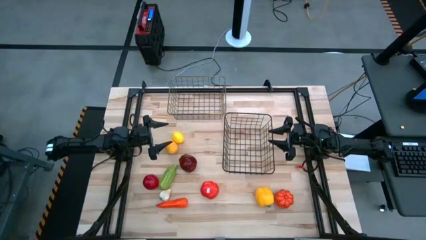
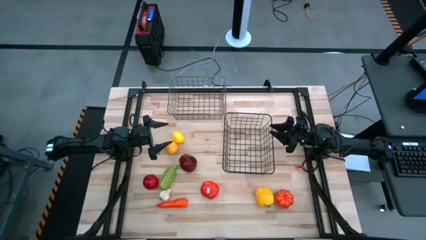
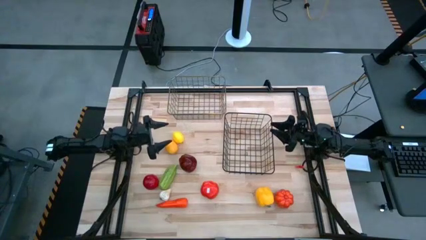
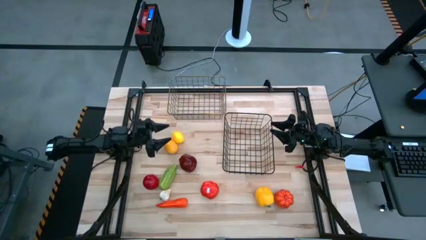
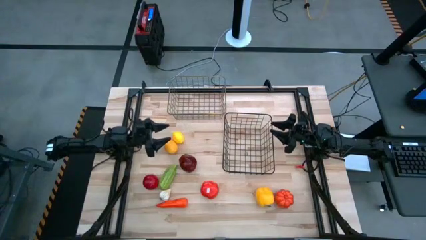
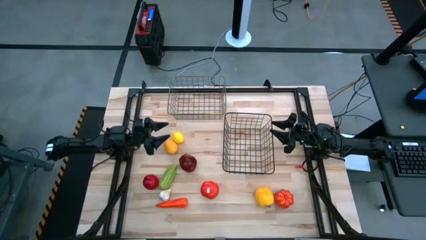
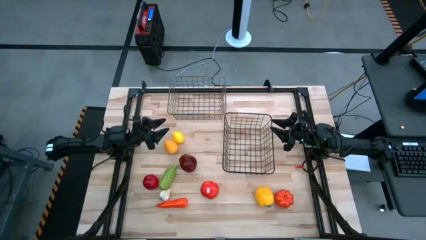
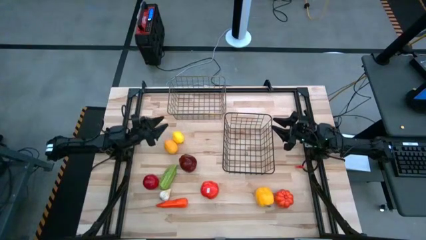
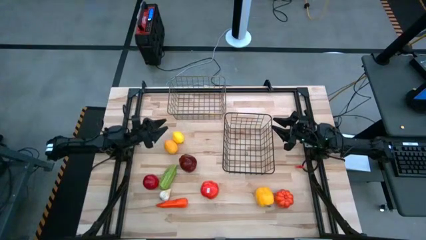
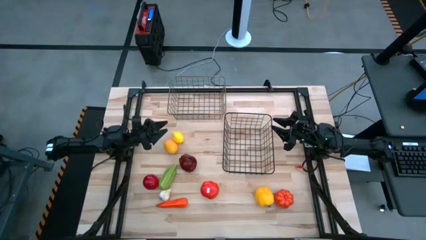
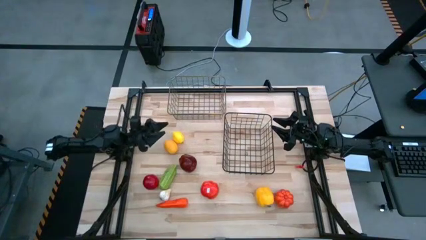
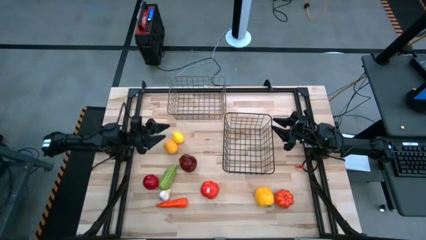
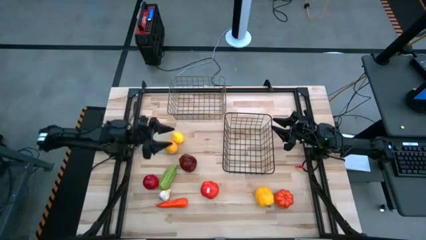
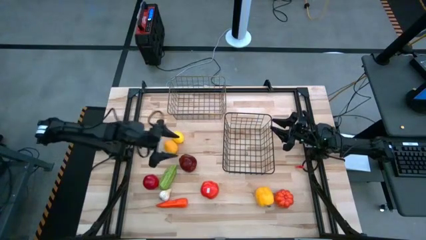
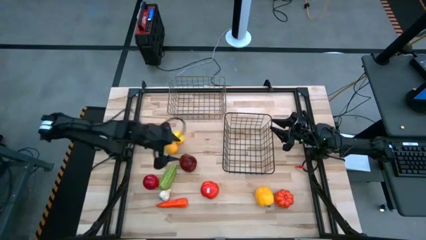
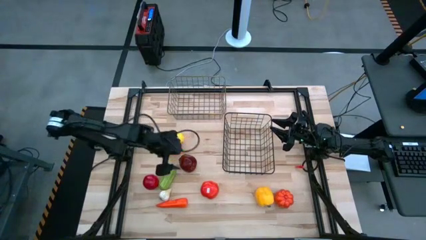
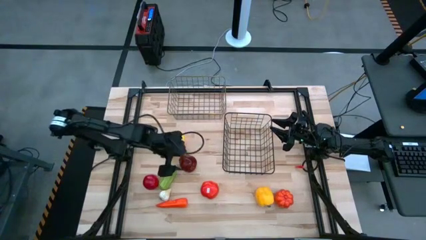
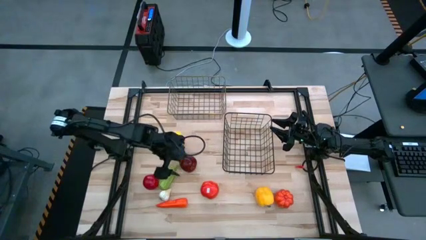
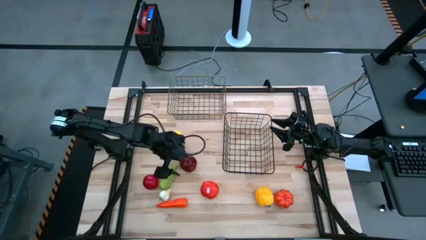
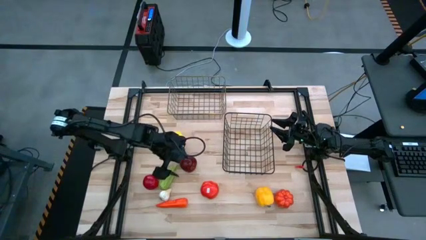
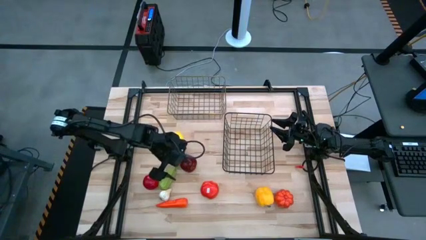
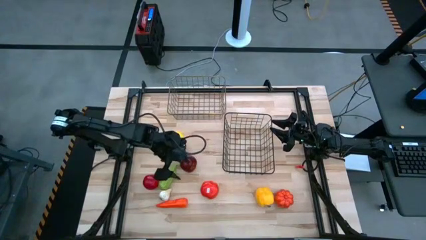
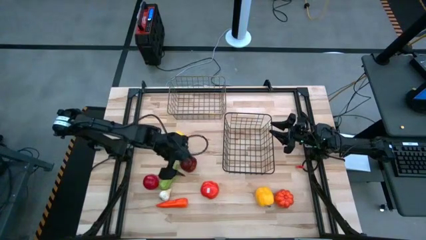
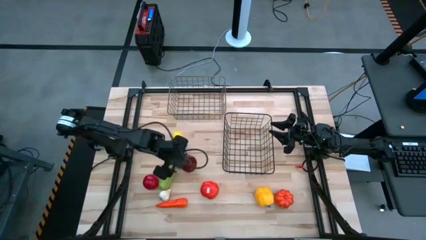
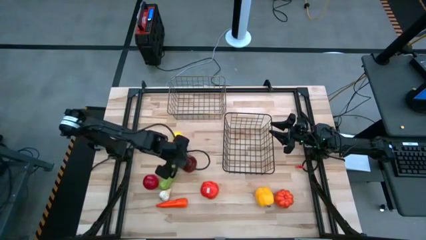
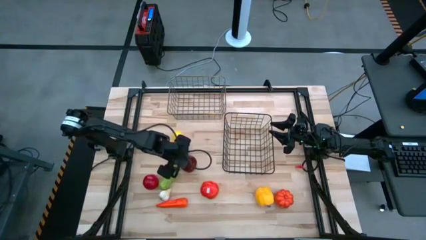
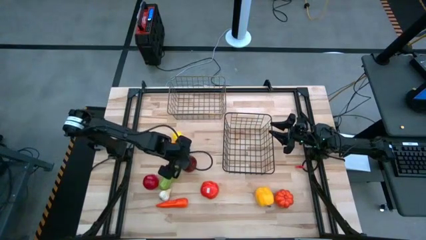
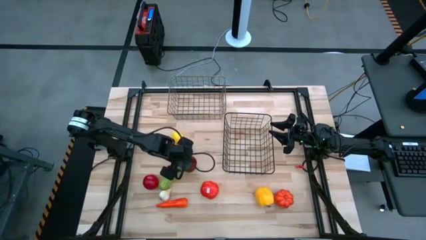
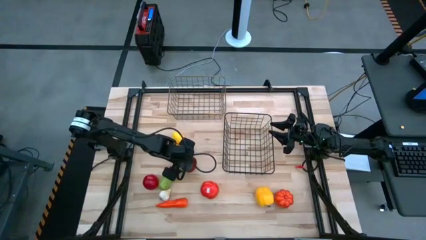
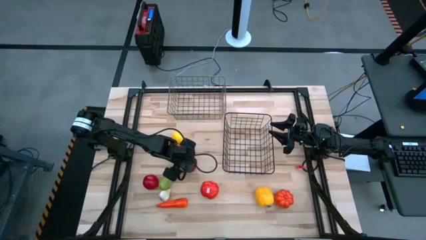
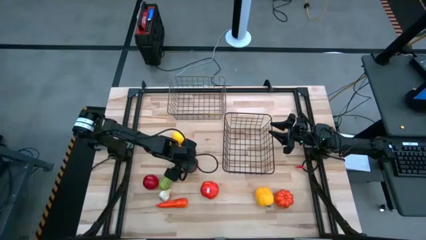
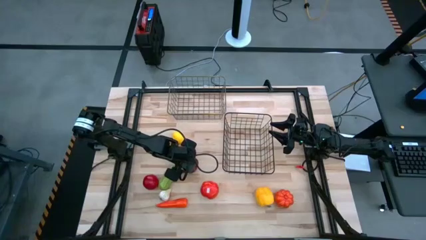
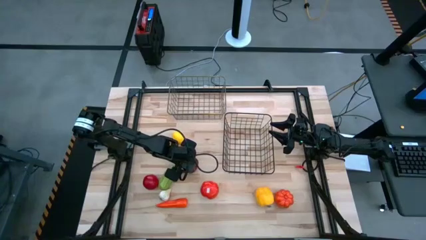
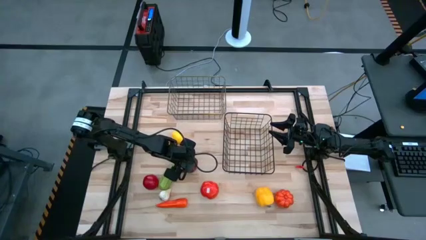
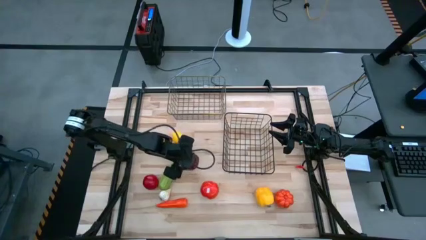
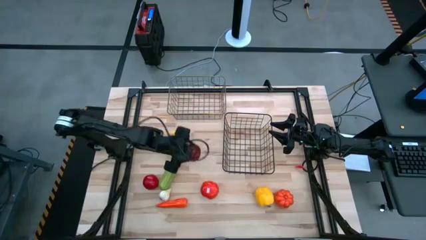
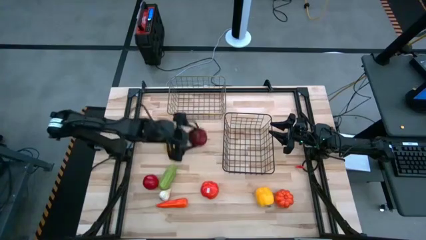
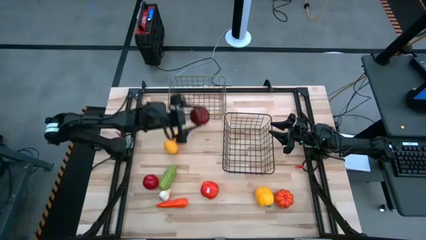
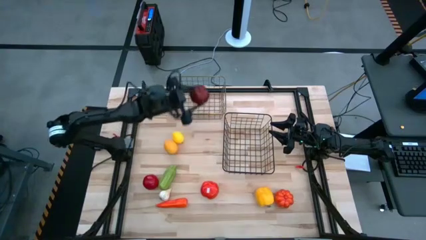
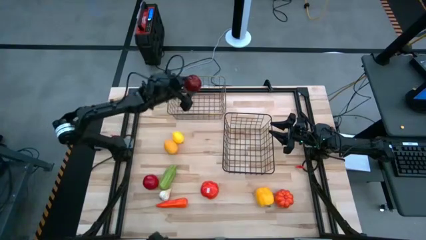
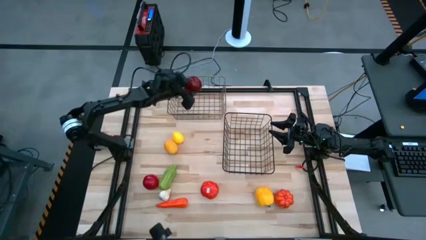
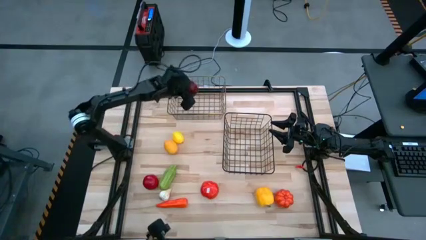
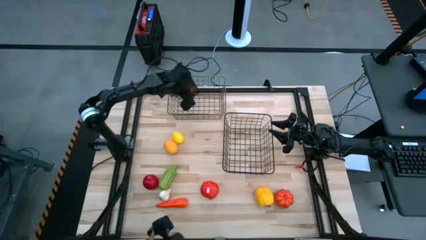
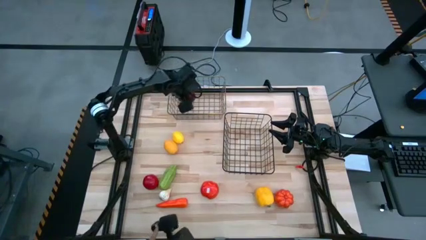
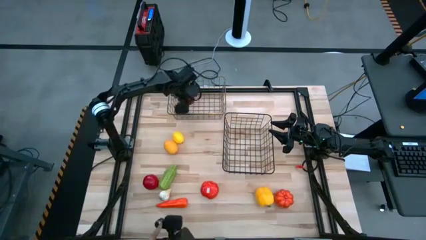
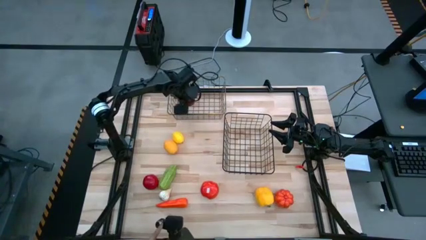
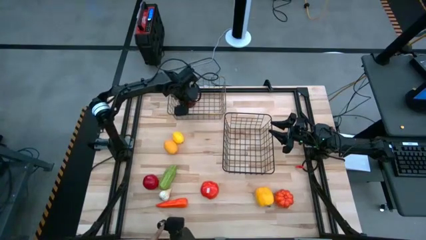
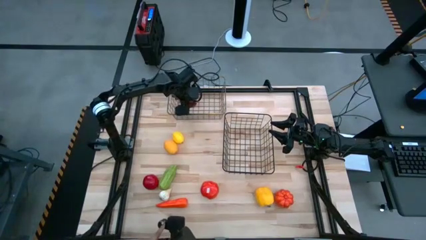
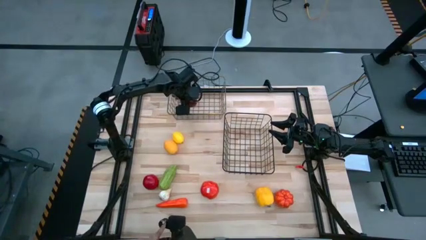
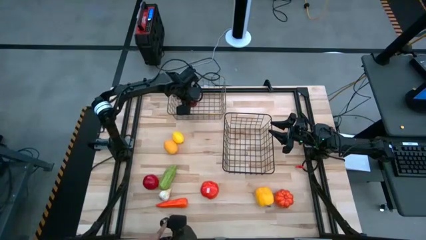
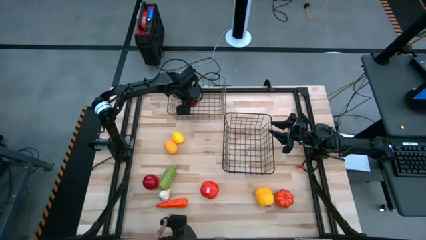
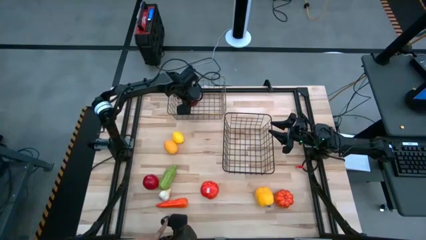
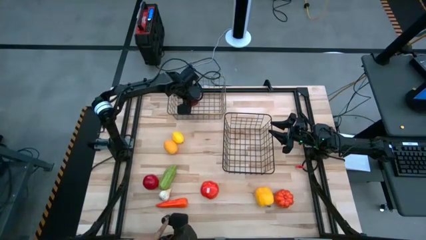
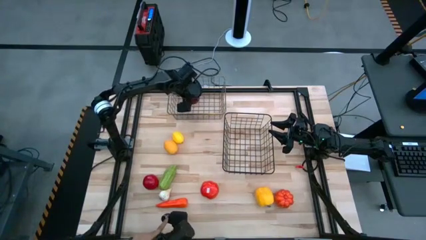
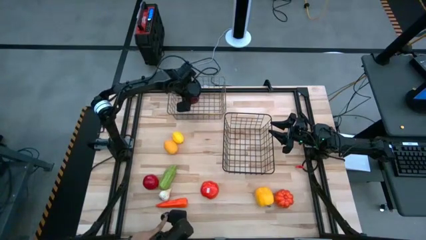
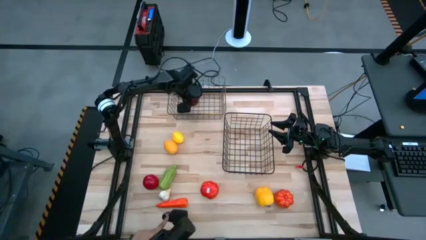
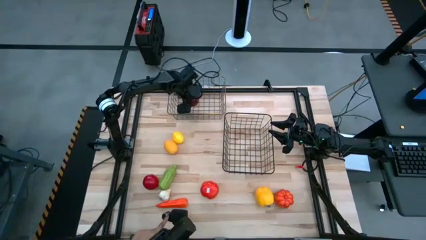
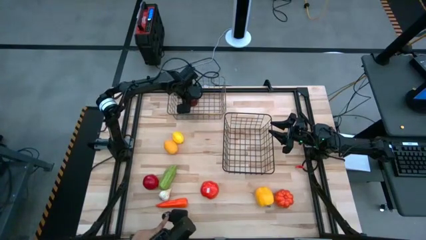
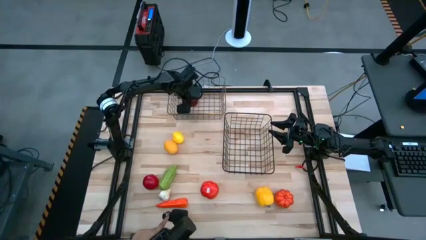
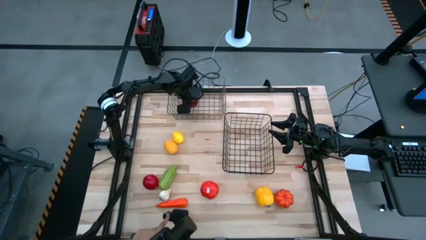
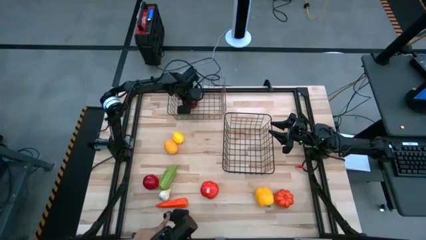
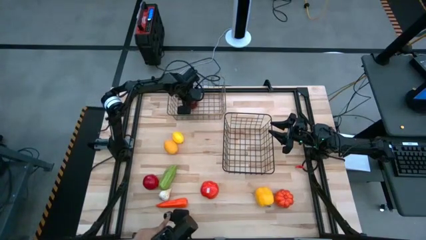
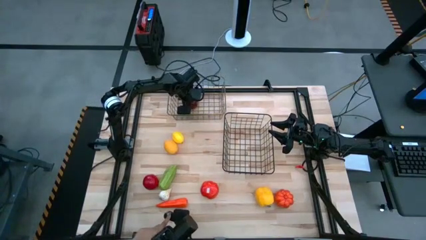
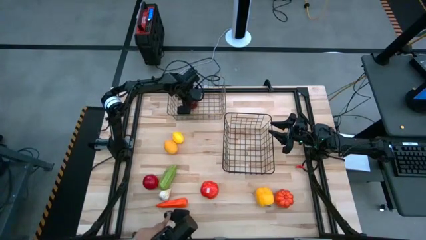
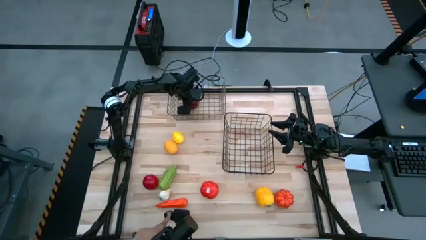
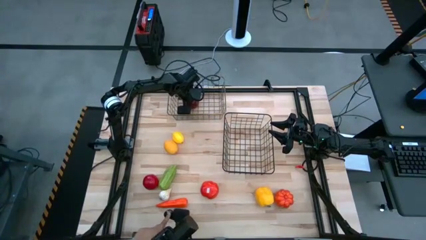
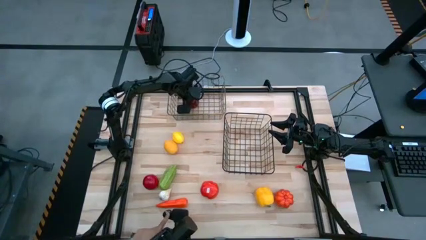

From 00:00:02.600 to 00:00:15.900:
Task: Sort produce into baskets
Put the red apple into the silver wire basket
